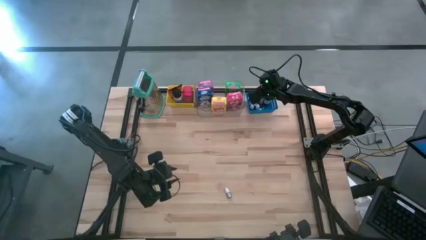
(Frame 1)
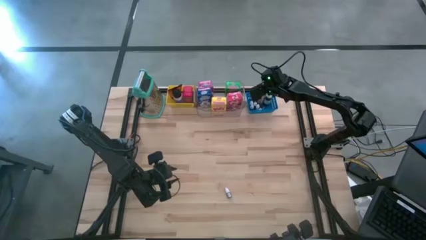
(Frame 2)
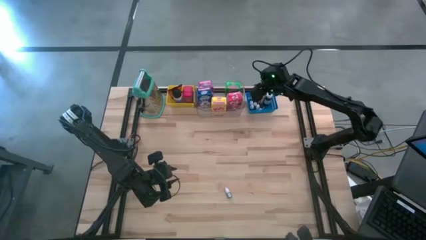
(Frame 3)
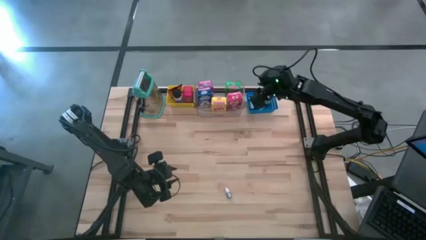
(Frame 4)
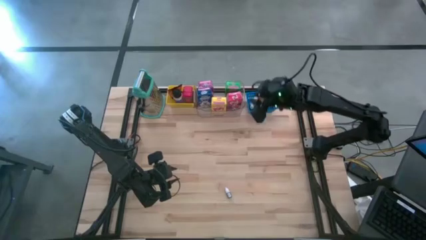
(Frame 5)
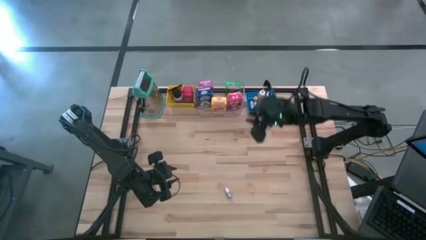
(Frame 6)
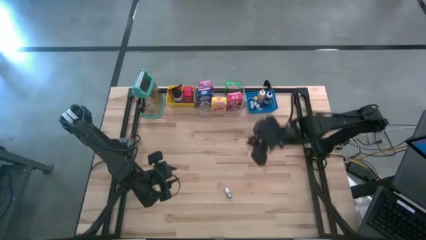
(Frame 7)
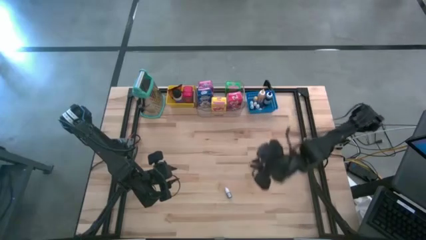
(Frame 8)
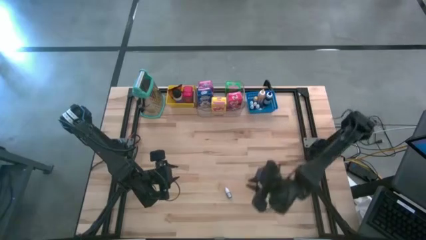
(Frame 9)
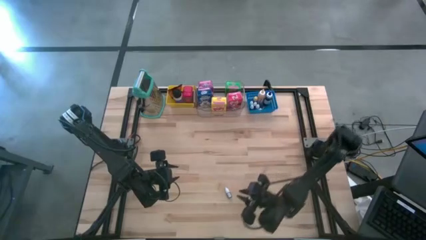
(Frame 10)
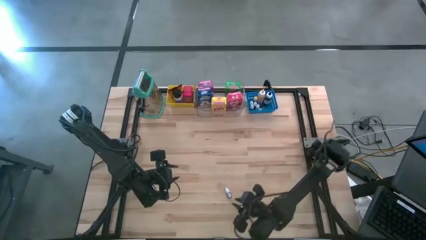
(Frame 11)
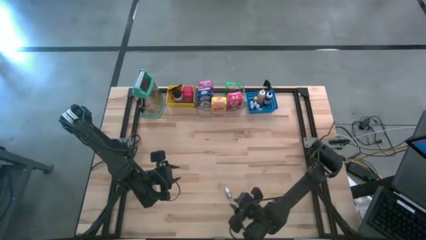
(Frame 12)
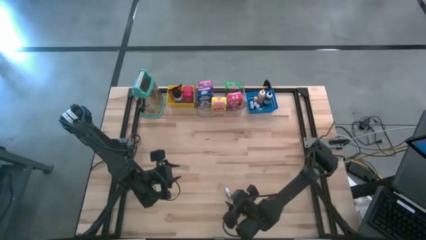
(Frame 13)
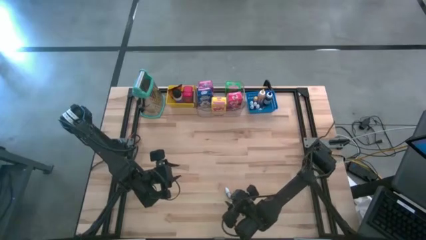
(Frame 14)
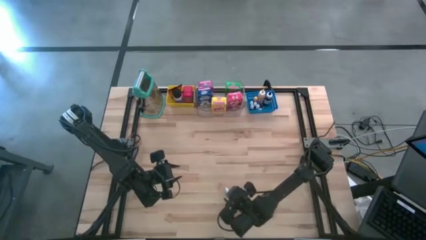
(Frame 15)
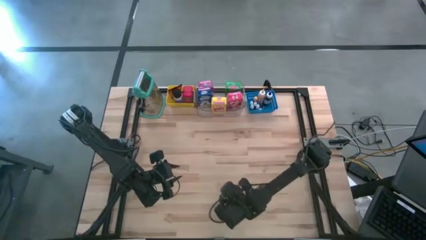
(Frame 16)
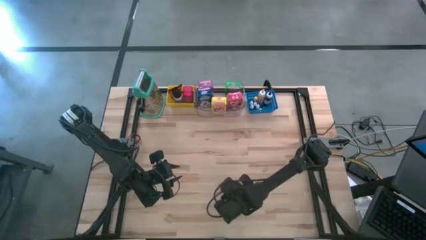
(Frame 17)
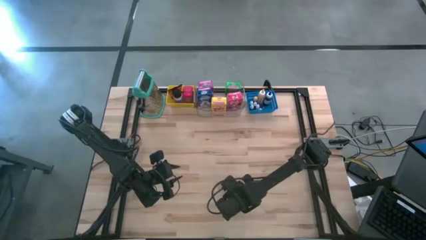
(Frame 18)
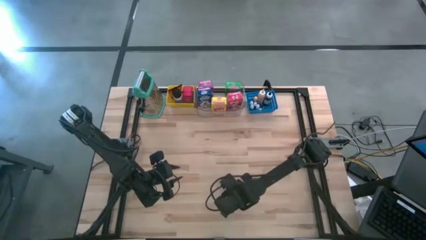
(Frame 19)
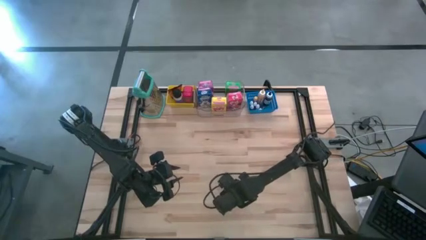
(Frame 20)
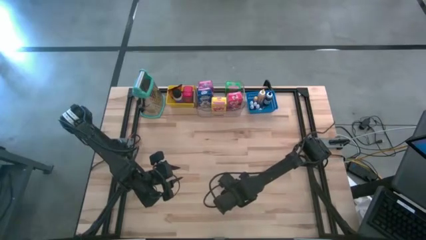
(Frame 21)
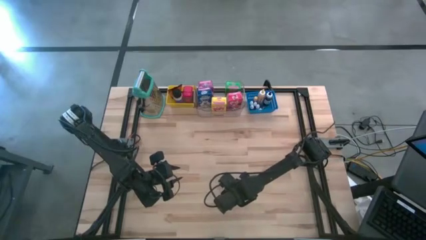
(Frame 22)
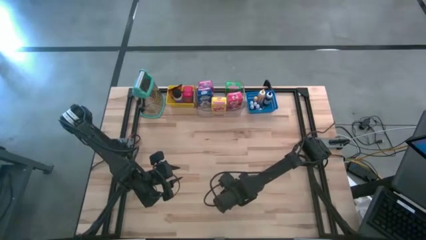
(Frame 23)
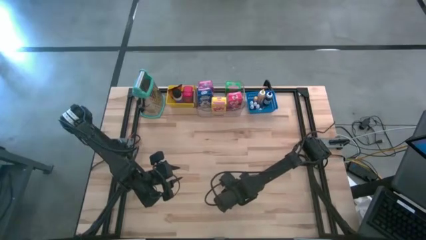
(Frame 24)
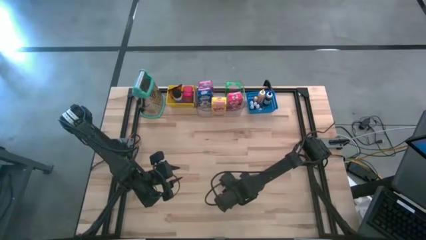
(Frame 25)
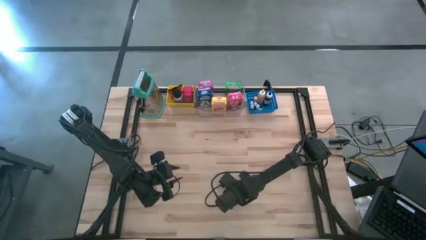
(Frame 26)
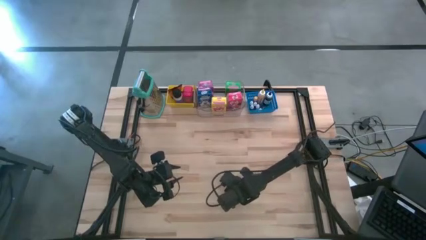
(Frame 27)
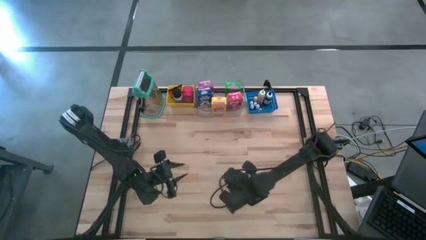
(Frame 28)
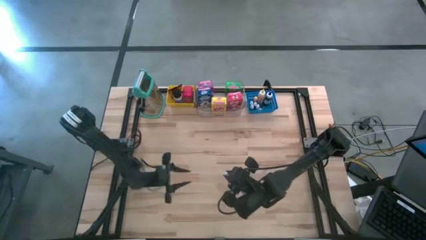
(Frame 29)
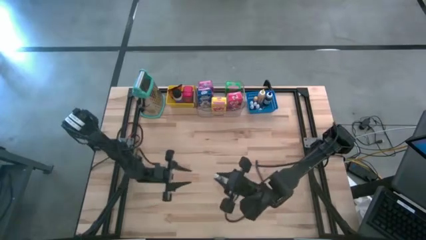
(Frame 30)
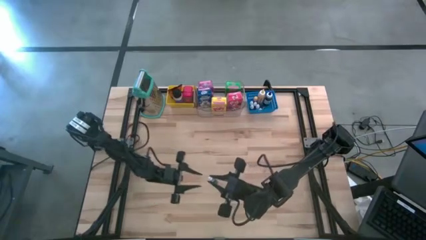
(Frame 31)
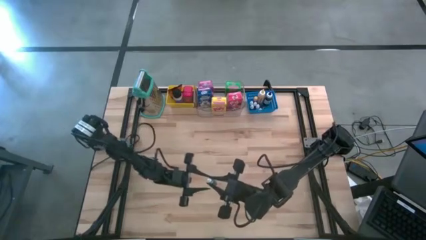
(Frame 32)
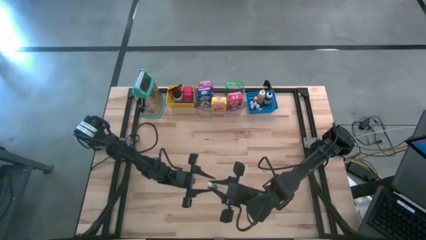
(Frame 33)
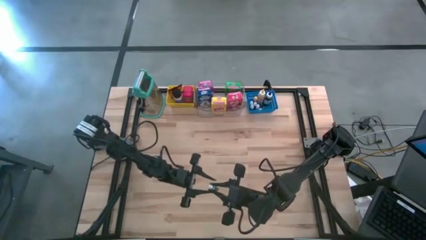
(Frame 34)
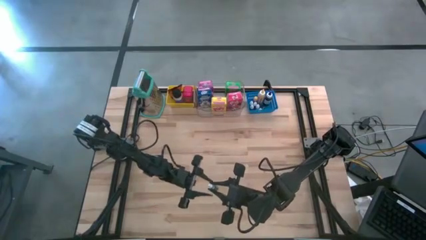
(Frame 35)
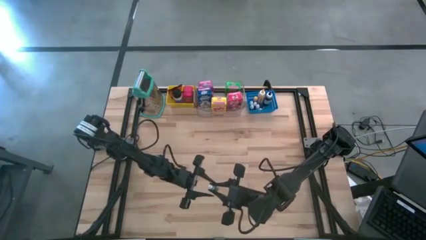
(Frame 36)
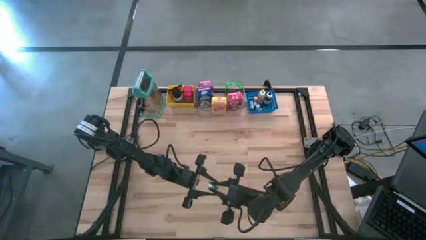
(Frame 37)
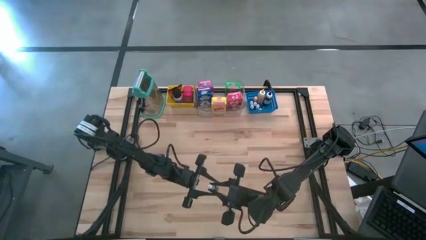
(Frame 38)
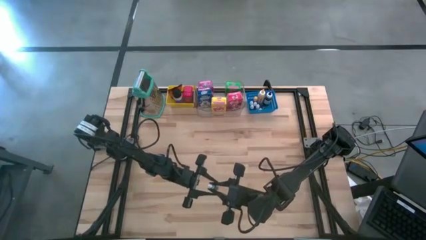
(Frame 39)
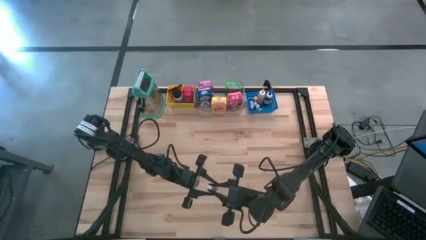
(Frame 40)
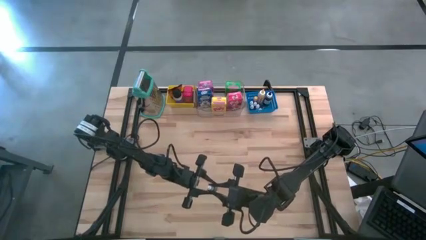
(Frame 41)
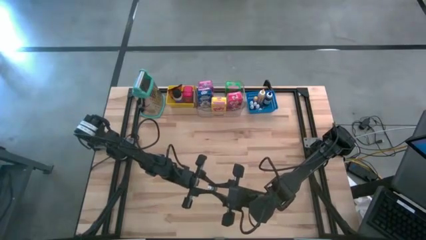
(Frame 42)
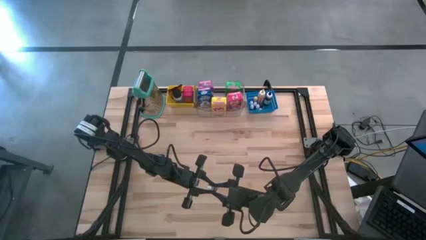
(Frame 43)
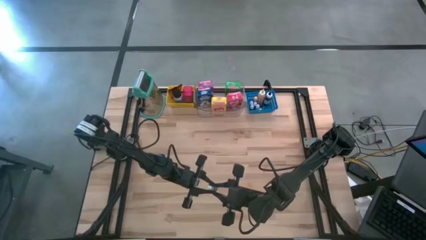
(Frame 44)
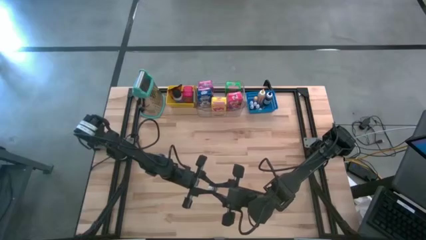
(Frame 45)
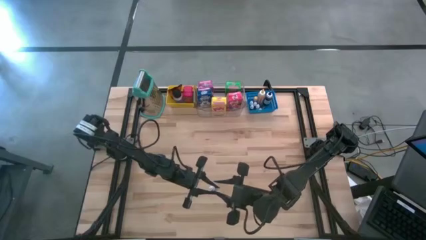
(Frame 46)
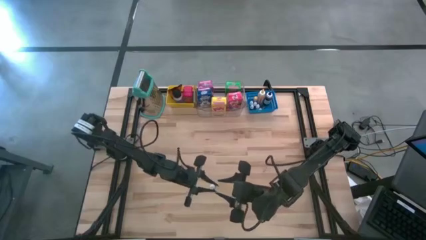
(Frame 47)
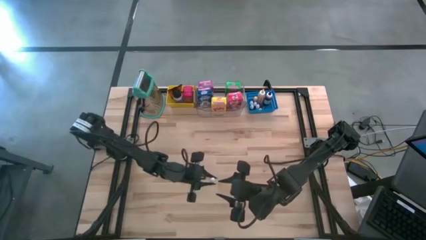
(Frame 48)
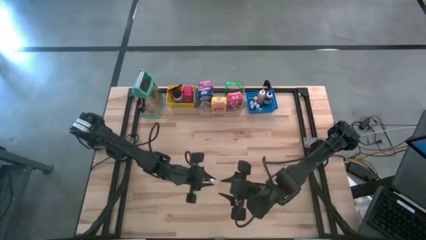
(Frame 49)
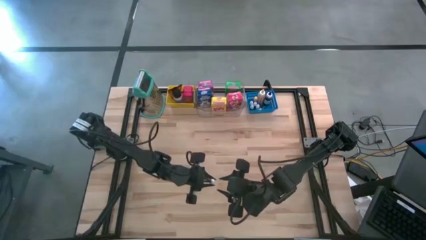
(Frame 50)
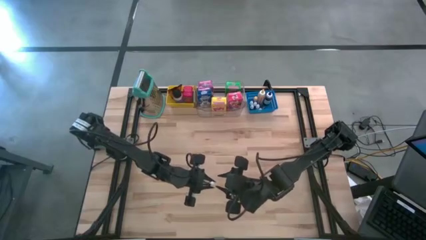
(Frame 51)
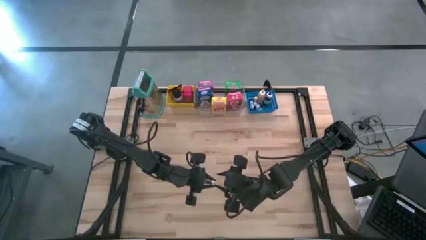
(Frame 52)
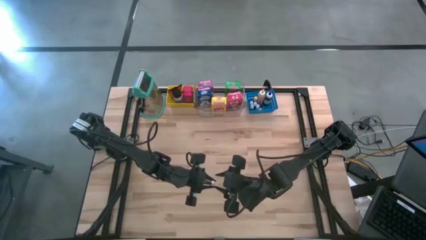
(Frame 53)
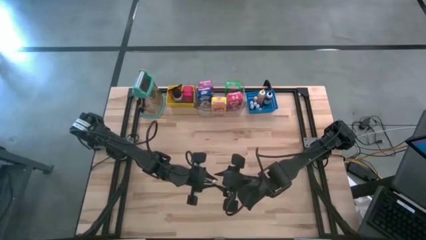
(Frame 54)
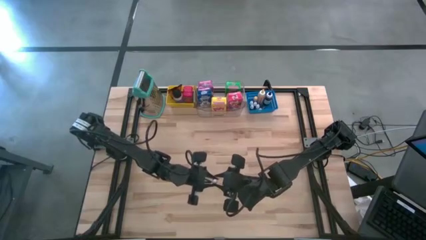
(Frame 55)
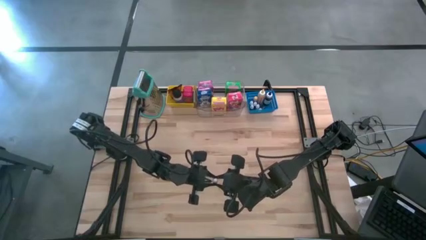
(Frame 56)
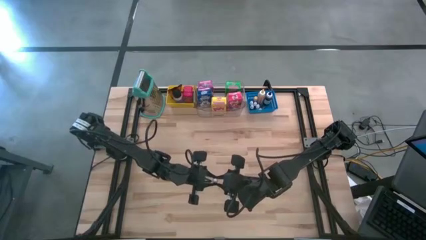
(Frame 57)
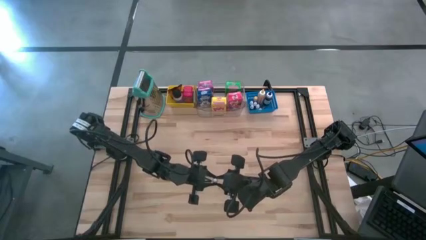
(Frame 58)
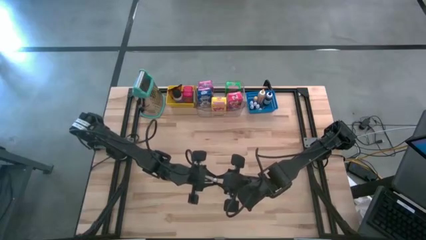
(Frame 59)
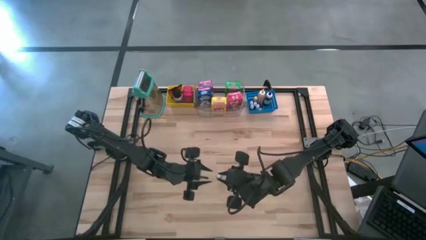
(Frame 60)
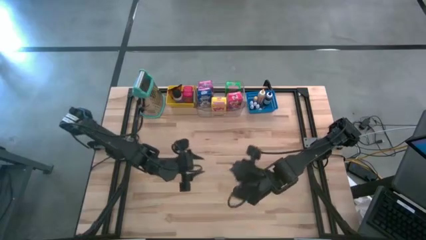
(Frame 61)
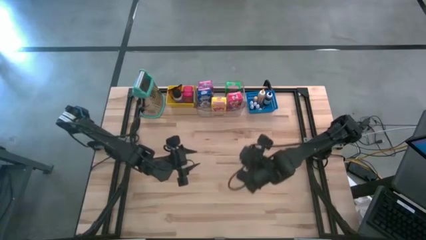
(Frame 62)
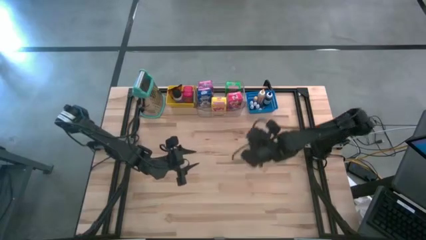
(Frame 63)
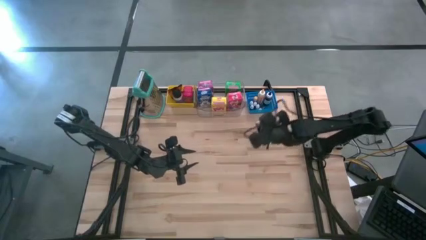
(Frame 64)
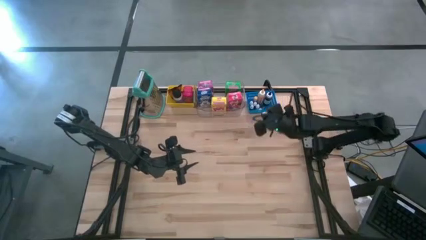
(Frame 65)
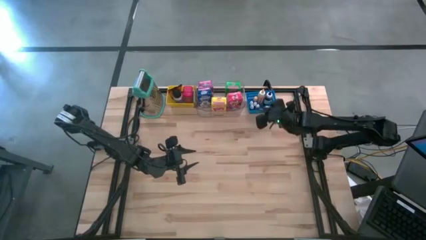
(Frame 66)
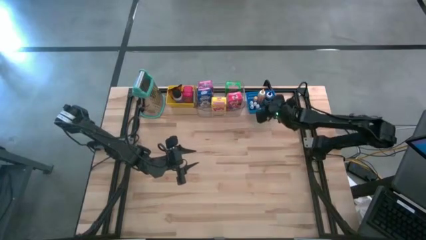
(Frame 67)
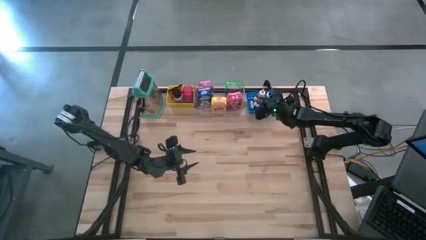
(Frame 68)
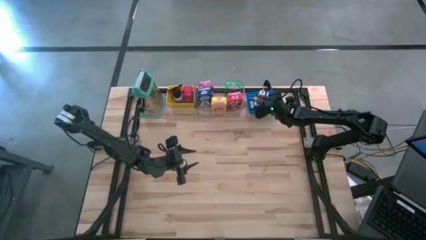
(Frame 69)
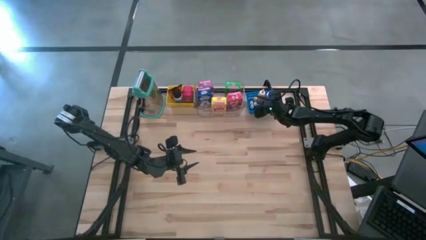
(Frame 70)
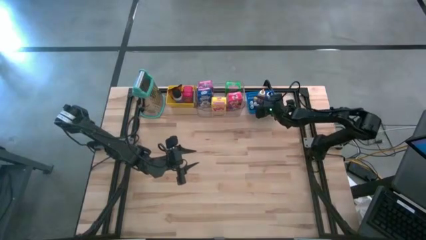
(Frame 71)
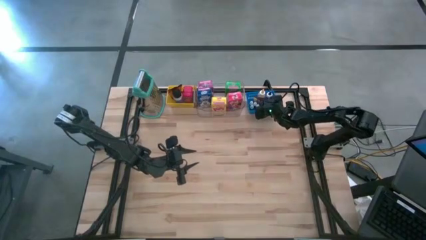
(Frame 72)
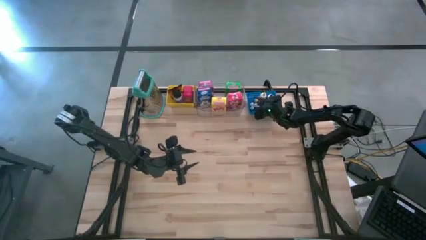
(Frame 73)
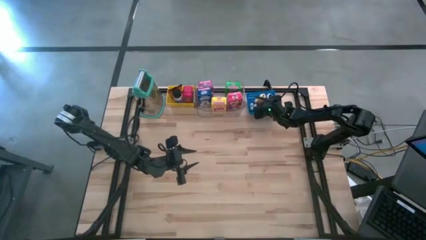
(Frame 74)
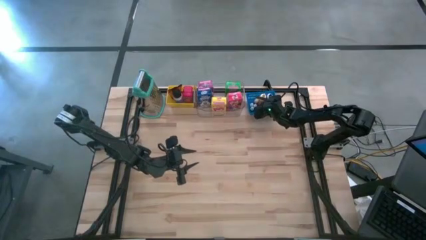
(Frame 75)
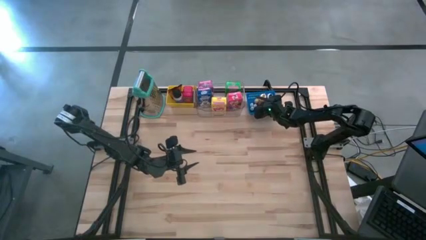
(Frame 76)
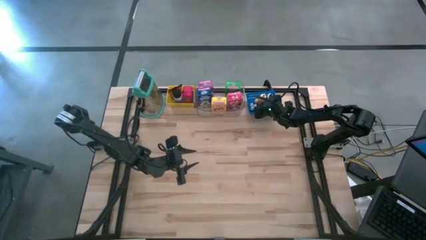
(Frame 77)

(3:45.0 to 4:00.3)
Task: Pick & Place Kitchen Items
Put the blue bottle into the blue bin
